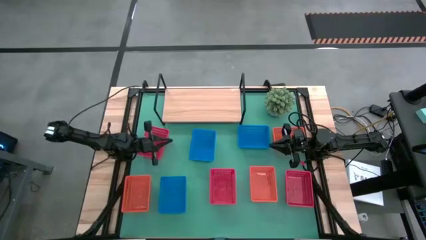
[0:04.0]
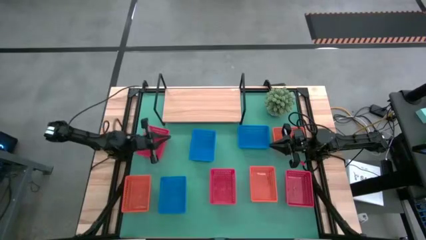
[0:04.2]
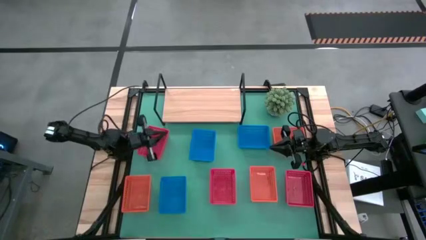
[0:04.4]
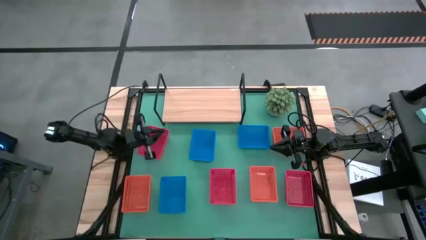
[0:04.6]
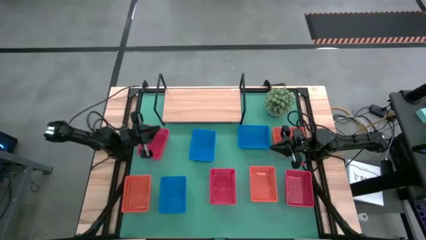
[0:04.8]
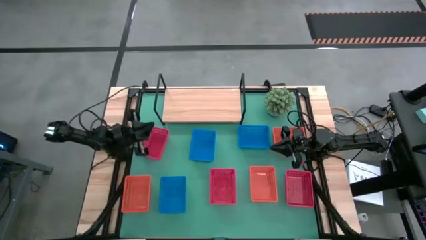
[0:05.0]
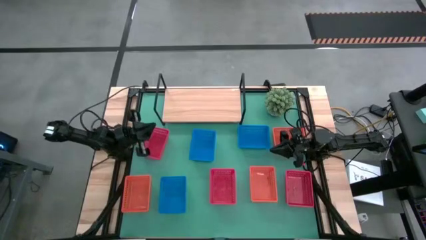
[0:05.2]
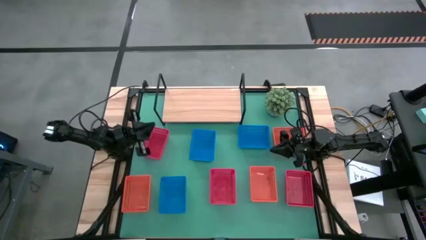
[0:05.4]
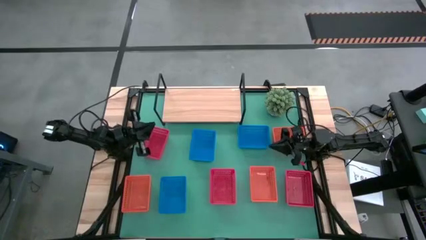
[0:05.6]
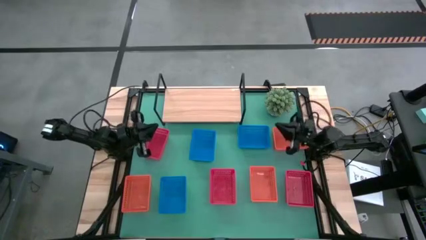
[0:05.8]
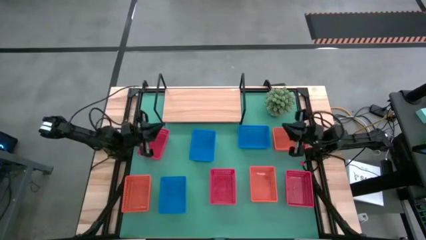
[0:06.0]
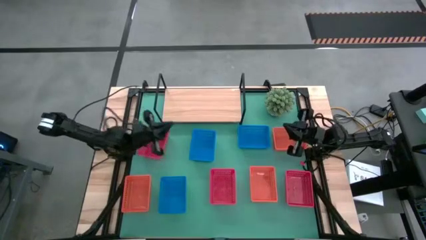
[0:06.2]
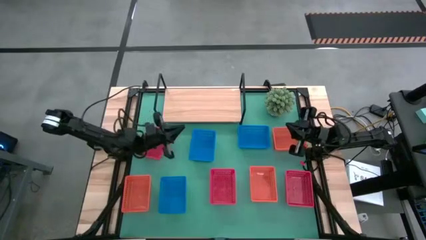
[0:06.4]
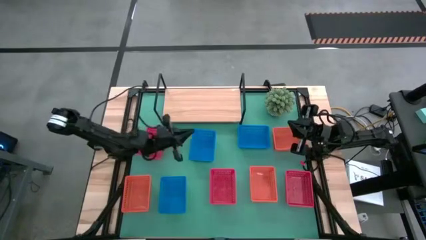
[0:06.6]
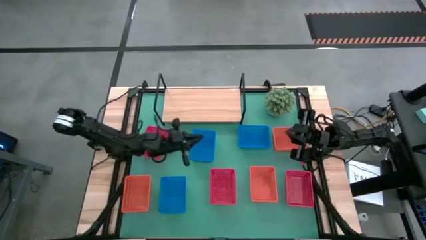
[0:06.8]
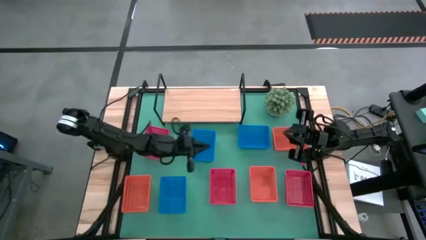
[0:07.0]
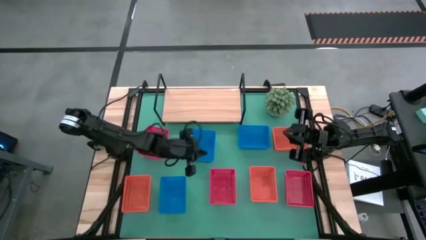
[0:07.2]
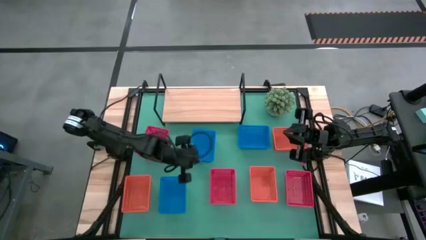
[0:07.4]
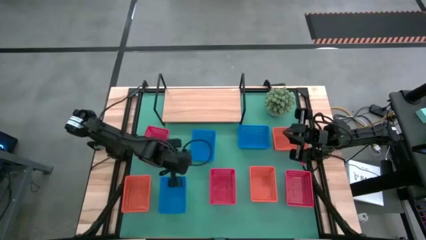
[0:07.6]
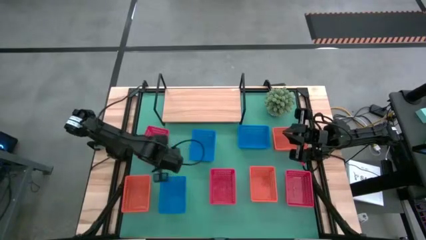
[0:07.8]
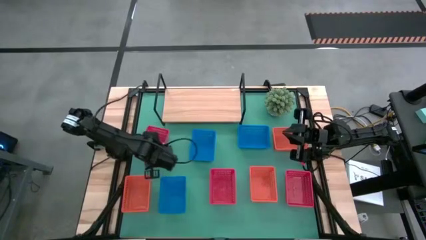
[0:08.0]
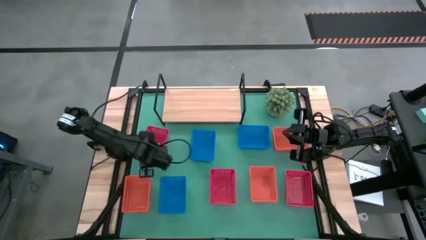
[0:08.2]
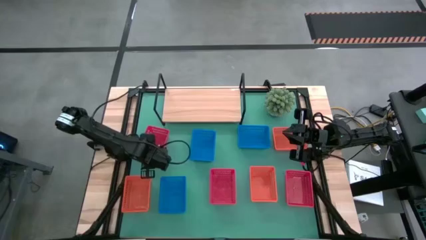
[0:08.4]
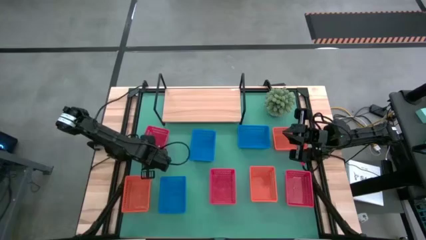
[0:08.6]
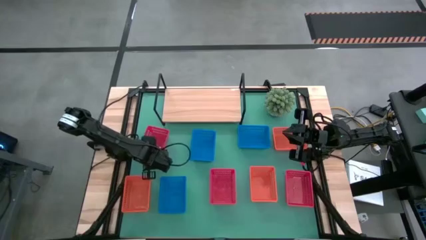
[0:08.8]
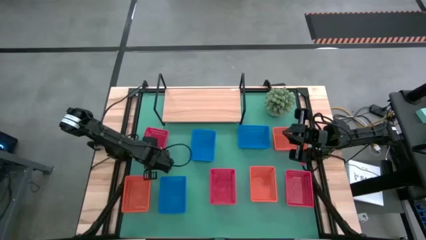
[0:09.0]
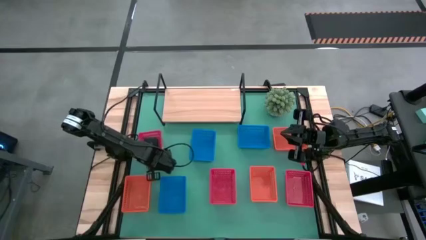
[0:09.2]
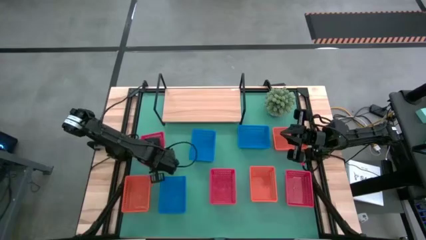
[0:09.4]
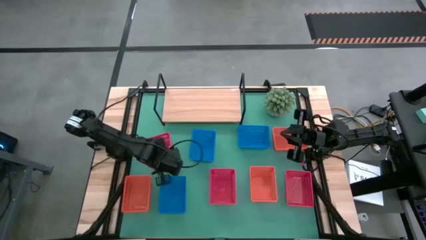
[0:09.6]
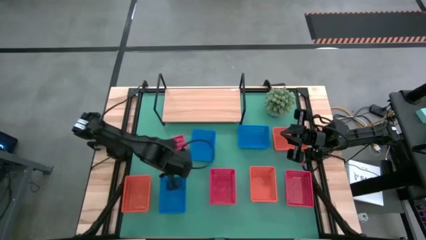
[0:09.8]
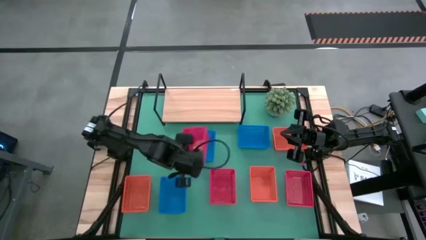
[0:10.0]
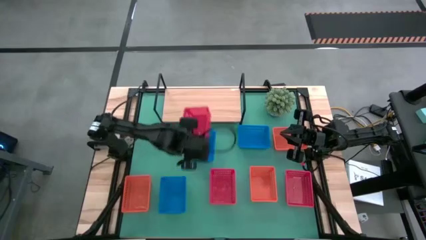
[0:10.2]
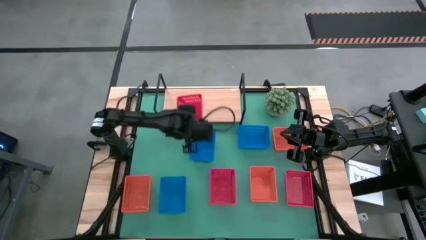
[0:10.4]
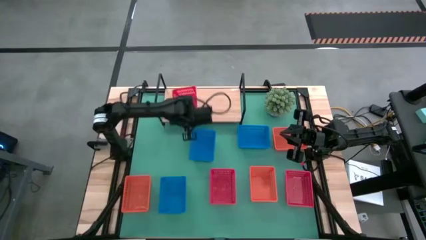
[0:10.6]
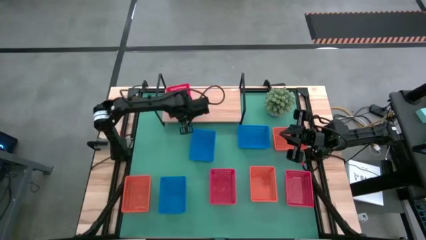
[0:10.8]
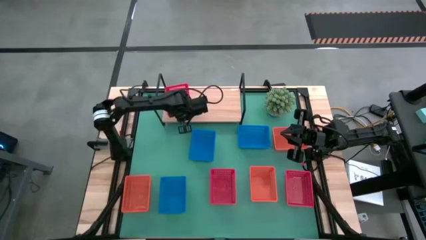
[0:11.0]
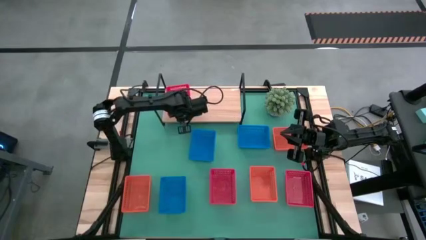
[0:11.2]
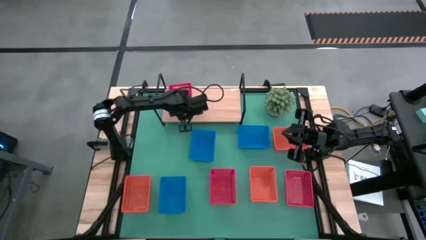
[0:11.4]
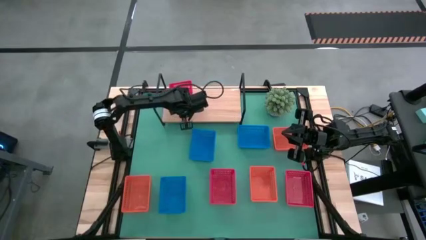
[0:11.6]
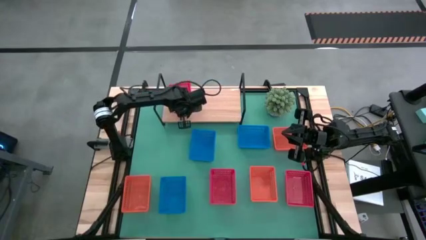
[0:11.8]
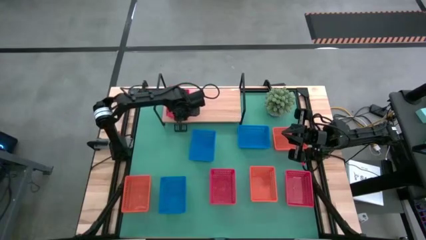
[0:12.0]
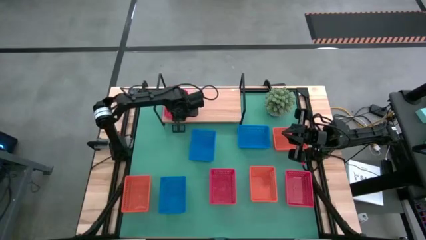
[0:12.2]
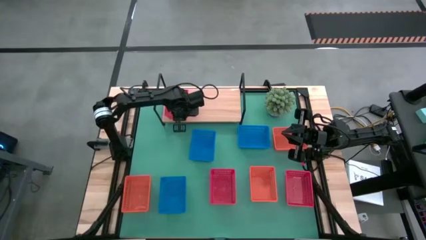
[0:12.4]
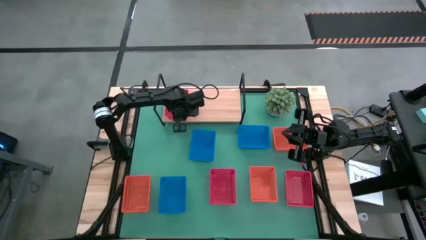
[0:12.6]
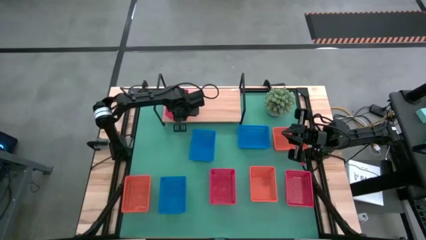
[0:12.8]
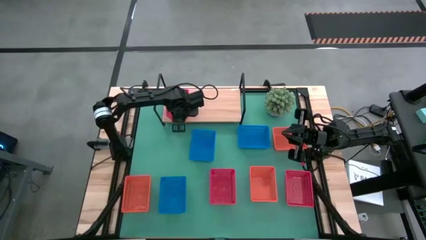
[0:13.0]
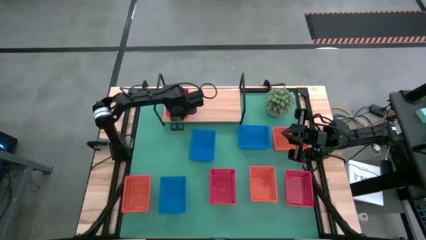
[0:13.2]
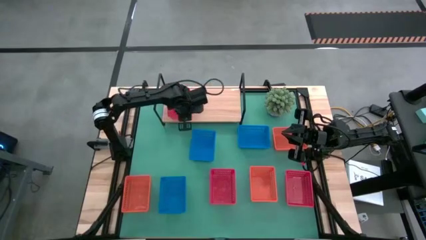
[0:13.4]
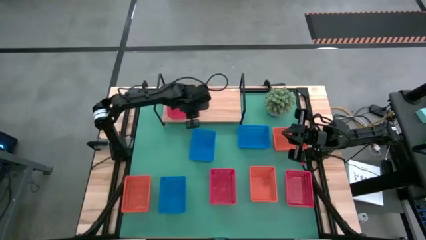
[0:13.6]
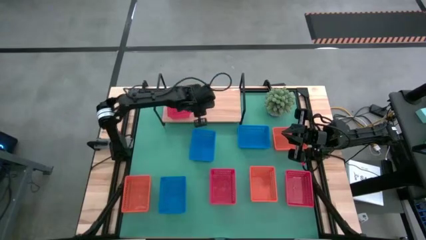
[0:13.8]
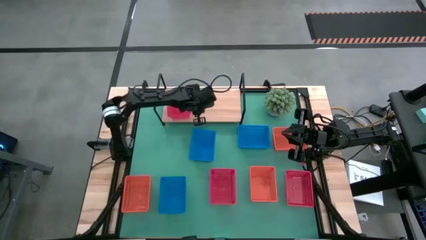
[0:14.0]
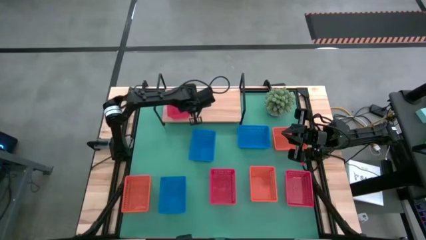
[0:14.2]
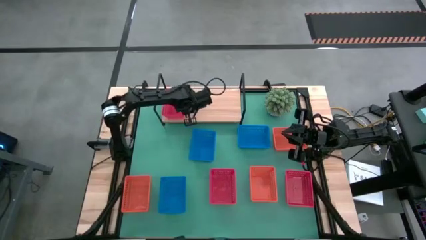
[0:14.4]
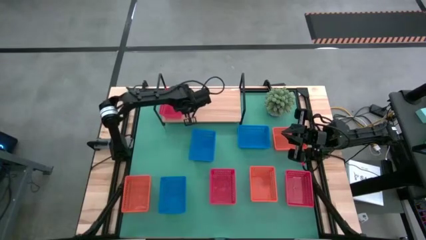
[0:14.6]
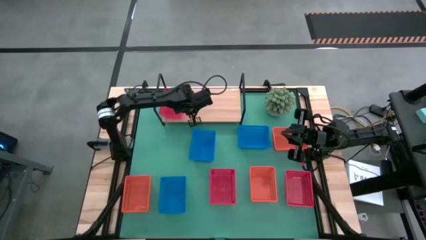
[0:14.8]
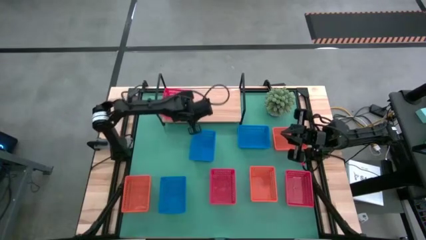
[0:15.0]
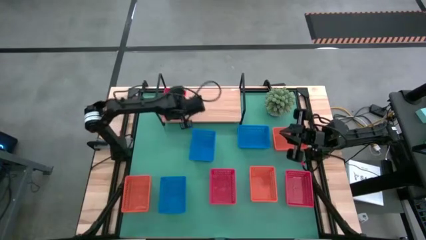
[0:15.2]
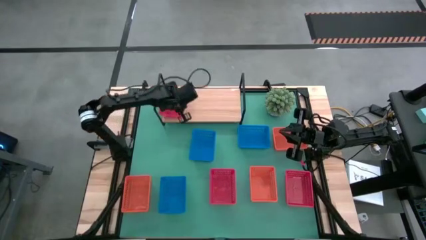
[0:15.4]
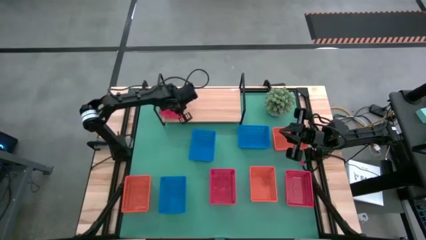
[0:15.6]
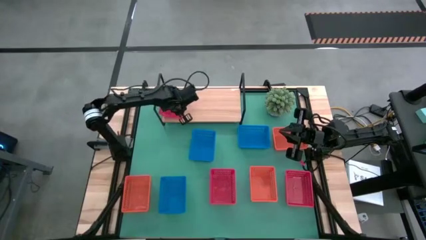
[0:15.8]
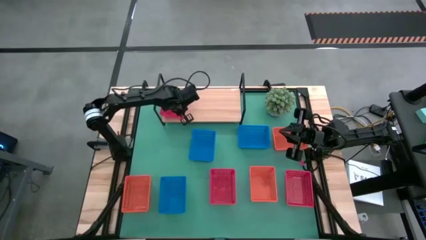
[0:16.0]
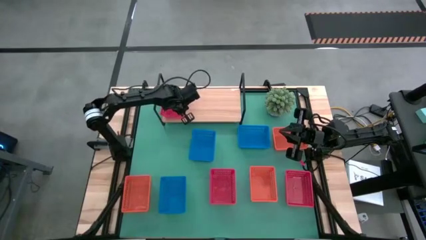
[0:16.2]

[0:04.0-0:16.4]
Task: Stack baskets on shelf by color
Put the top red bin on the shelf

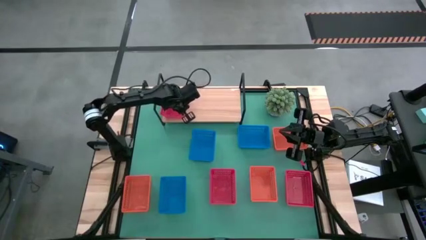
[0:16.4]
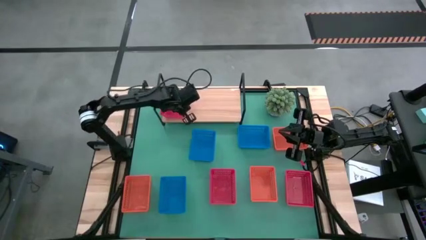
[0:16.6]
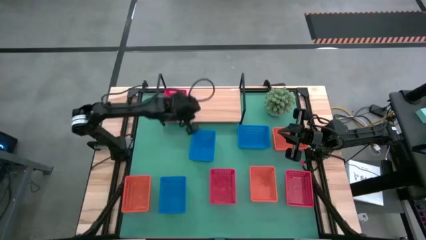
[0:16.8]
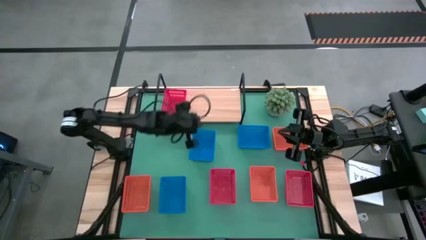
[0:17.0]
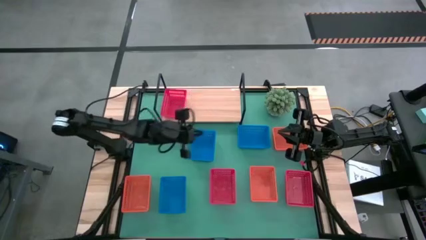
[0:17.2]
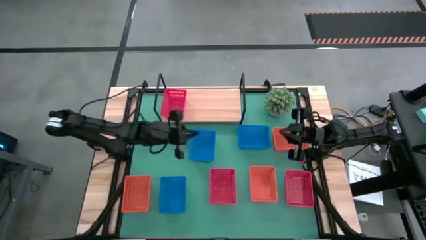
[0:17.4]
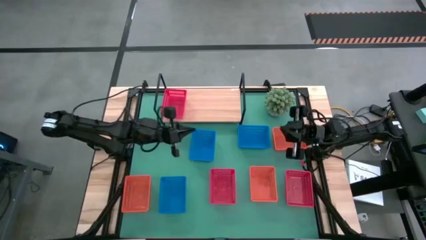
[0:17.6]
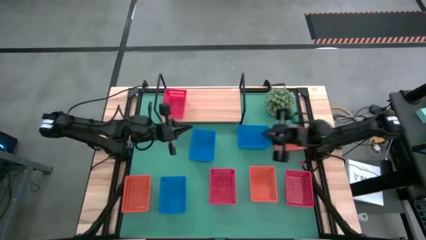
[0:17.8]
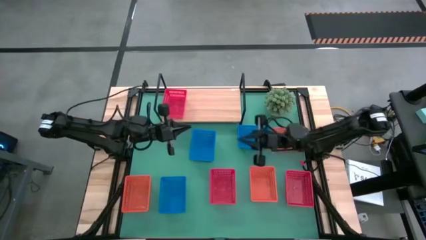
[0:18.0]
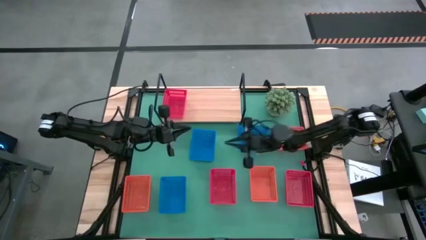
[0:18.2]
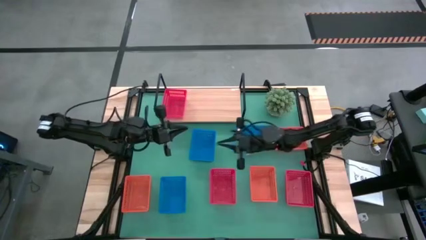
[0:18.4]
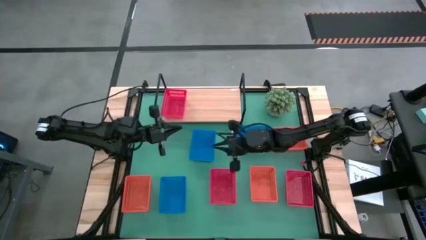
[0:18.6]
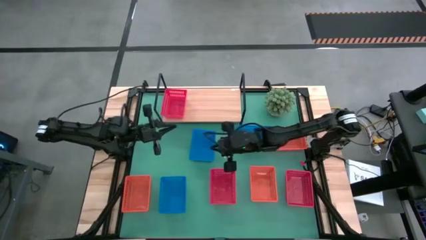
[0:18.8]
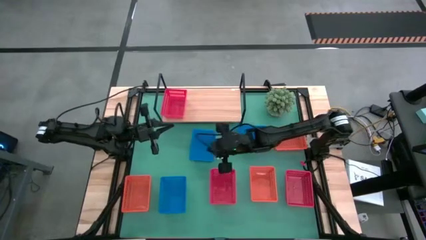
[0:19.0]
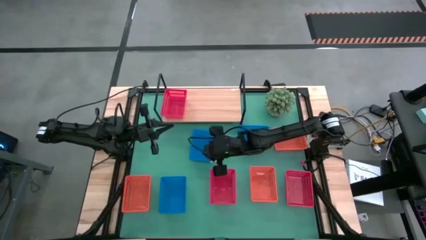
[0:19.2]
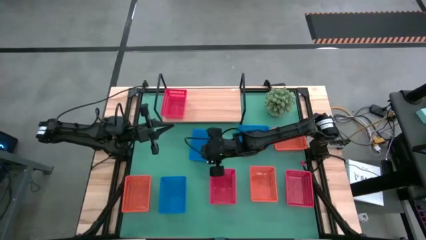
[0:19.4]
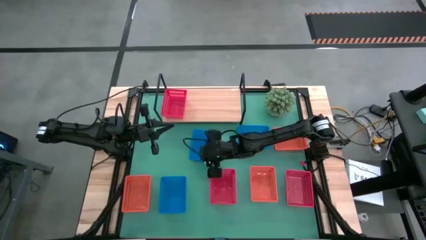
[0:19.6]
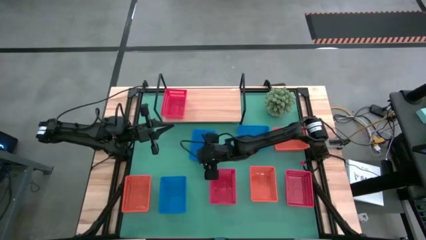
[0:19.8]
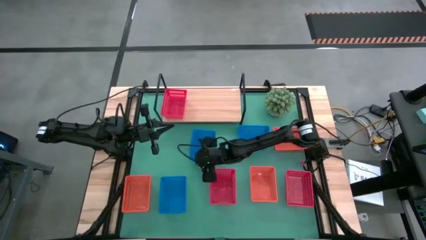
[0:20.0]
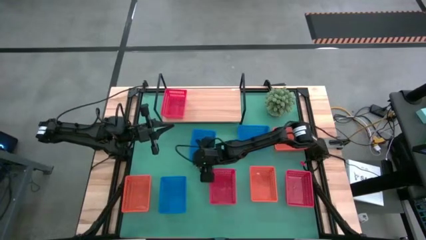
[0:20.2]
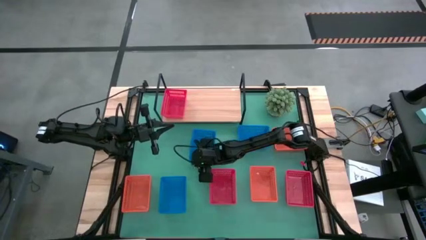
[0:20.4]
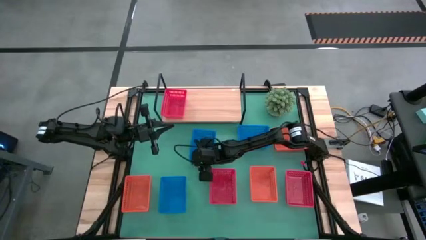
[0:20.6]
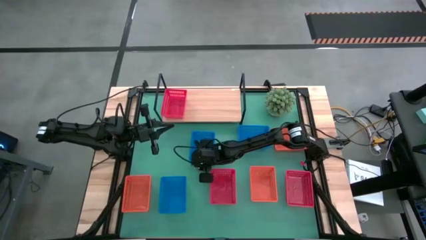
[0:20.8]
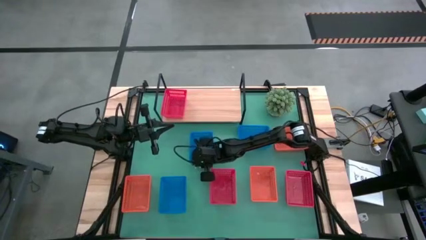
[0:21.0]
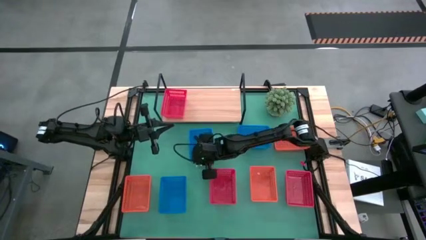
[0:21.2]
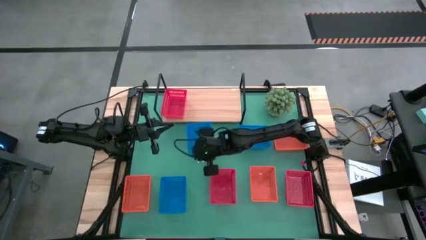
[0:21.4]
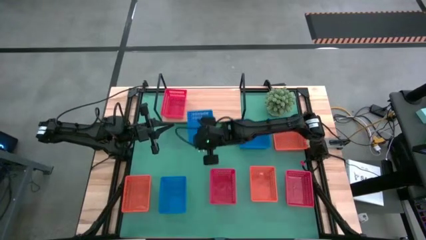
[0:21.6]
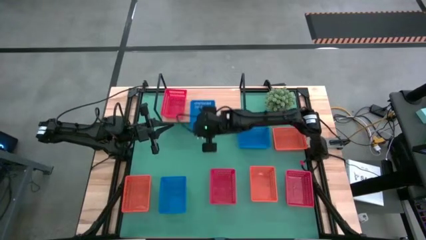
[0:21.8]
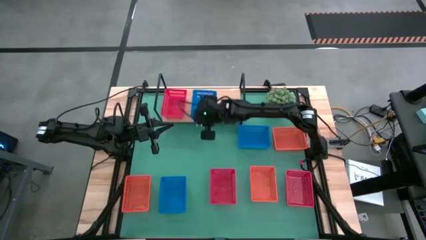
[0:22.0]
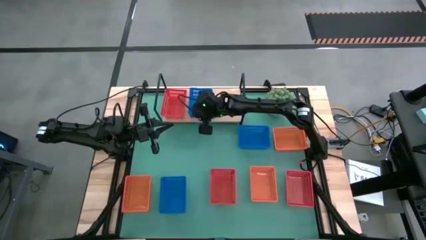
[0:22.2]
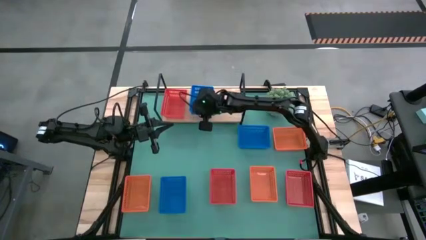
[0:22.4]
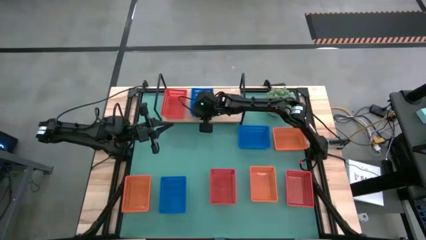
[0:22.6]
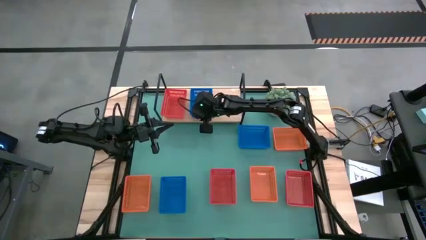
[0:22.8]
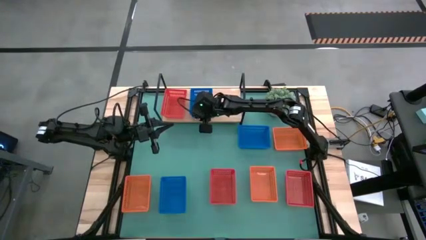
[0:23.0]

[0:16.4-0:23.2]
Put the top left blue bin on the shelf
